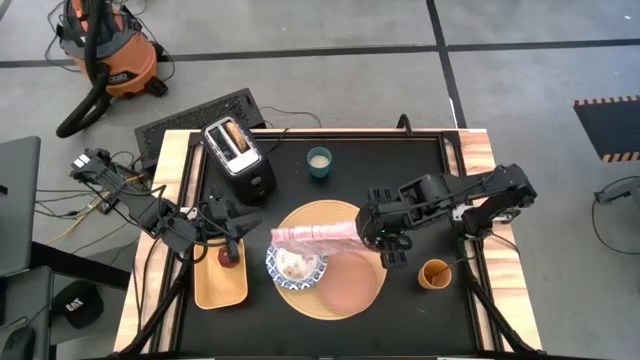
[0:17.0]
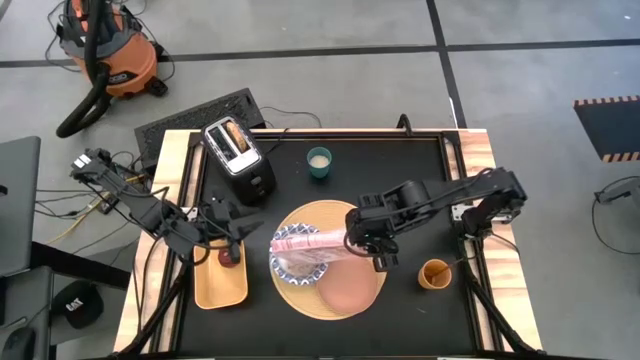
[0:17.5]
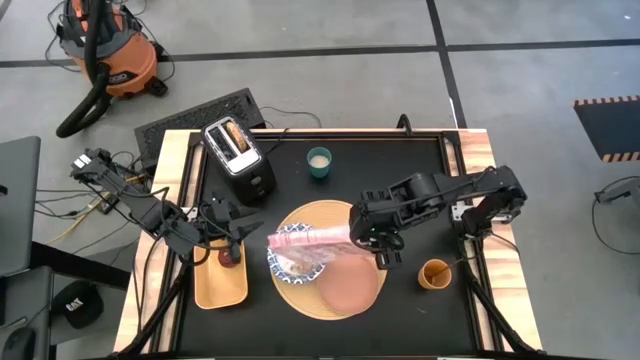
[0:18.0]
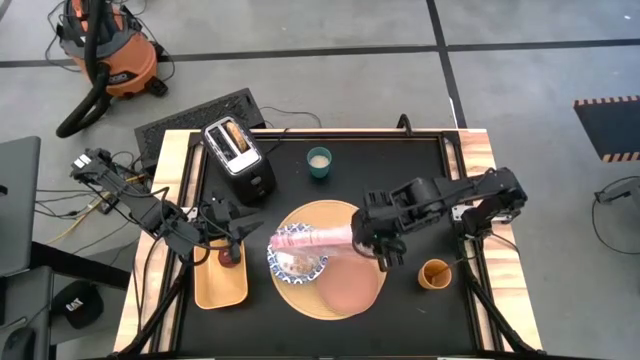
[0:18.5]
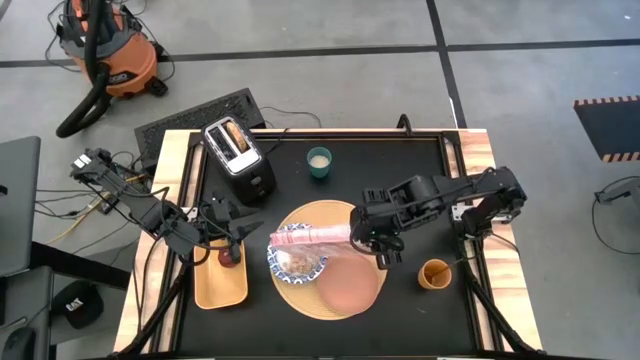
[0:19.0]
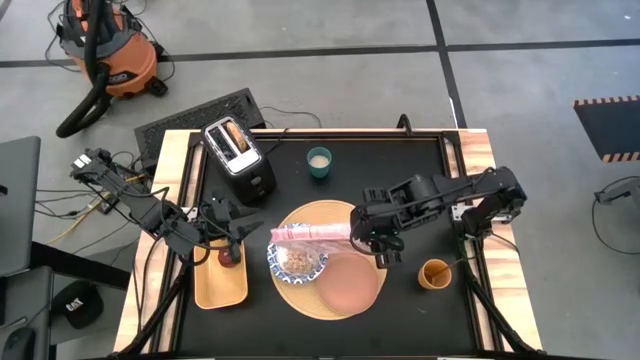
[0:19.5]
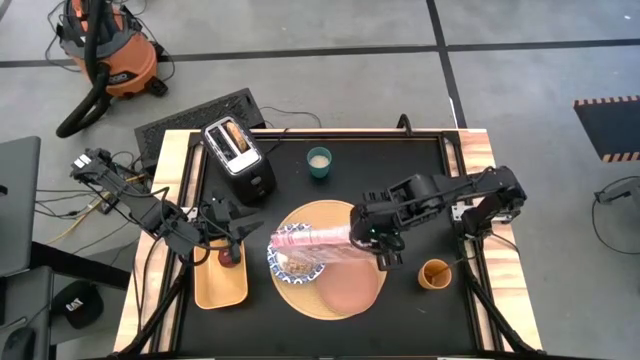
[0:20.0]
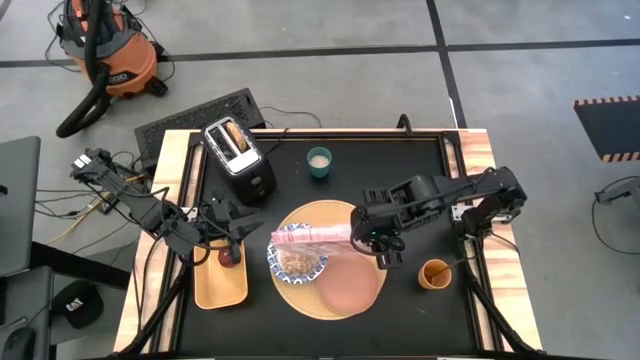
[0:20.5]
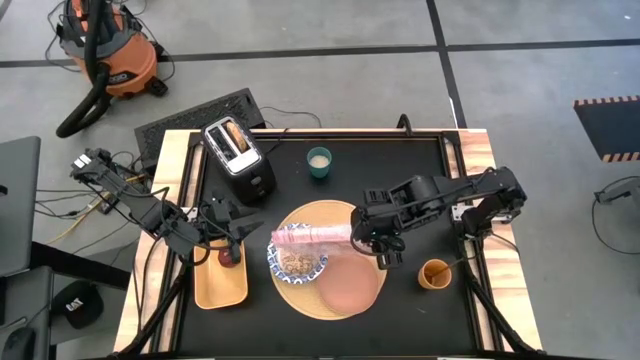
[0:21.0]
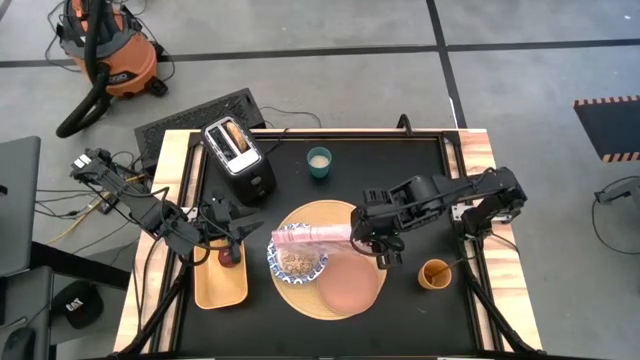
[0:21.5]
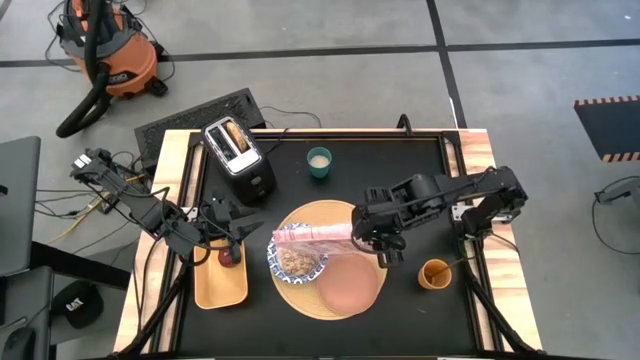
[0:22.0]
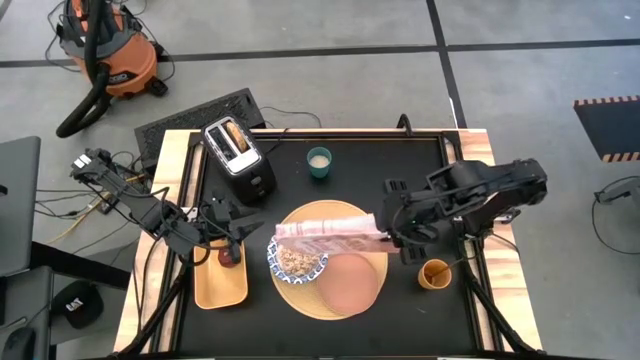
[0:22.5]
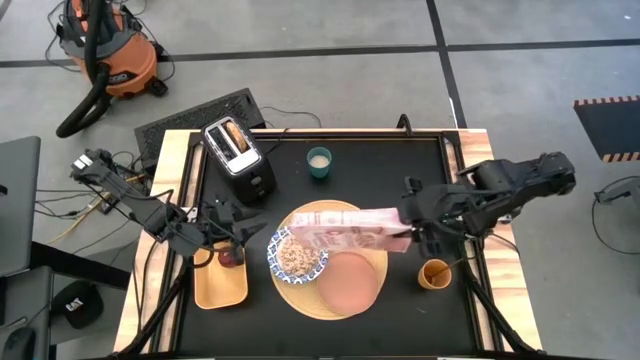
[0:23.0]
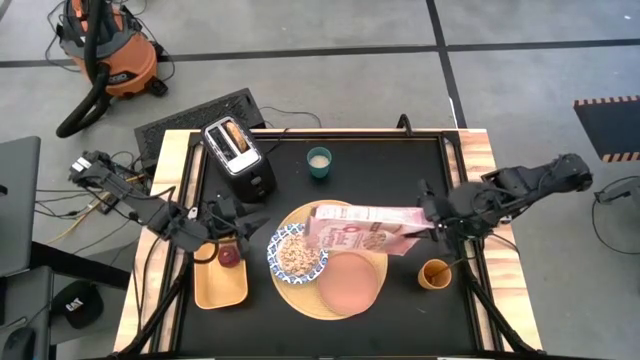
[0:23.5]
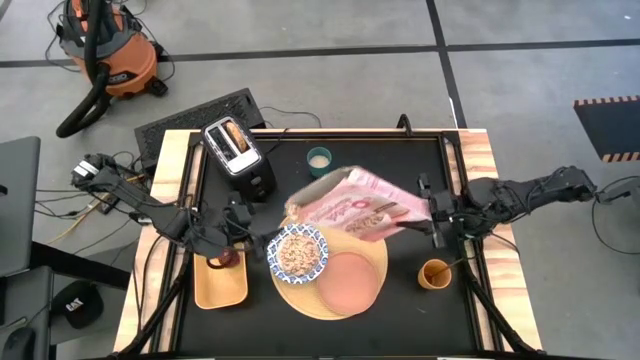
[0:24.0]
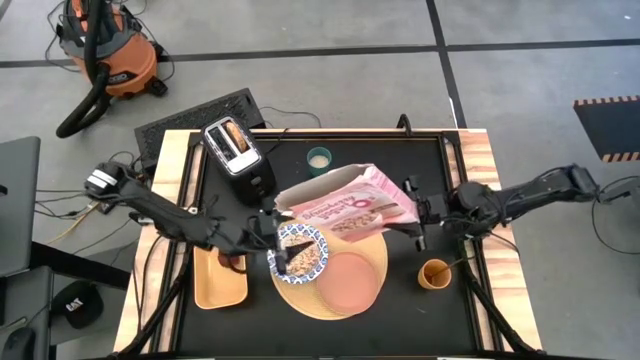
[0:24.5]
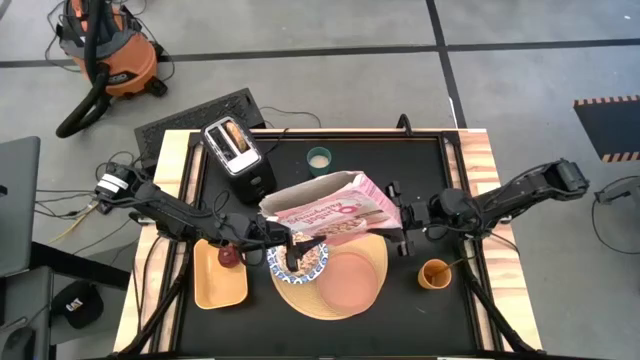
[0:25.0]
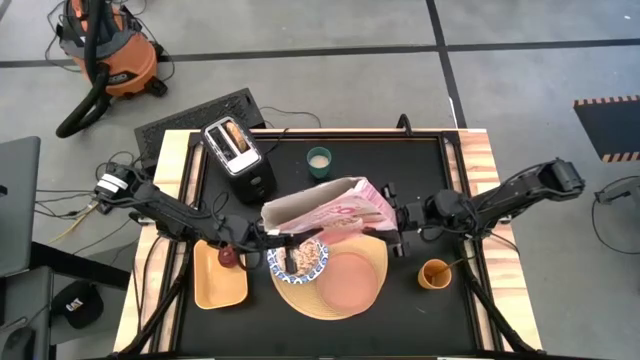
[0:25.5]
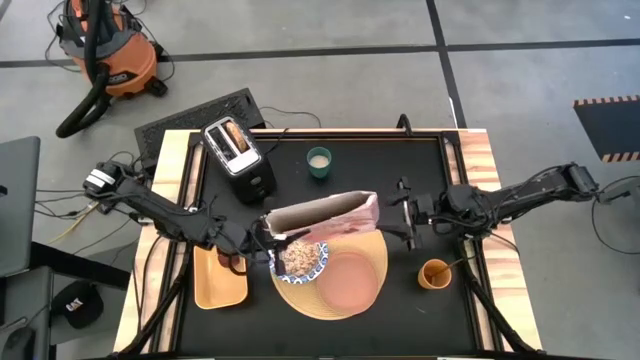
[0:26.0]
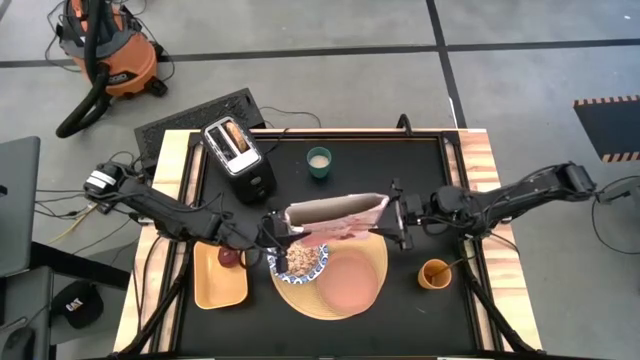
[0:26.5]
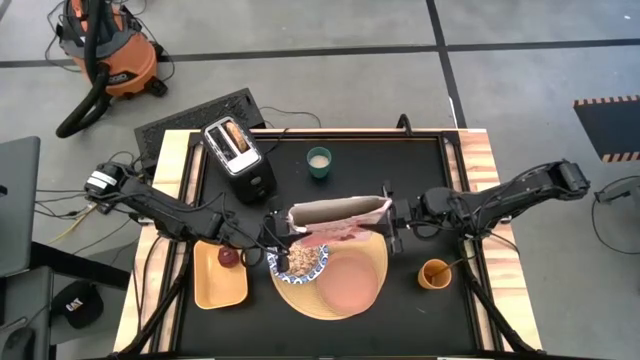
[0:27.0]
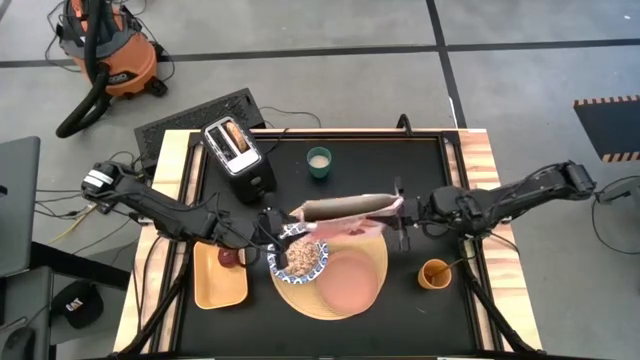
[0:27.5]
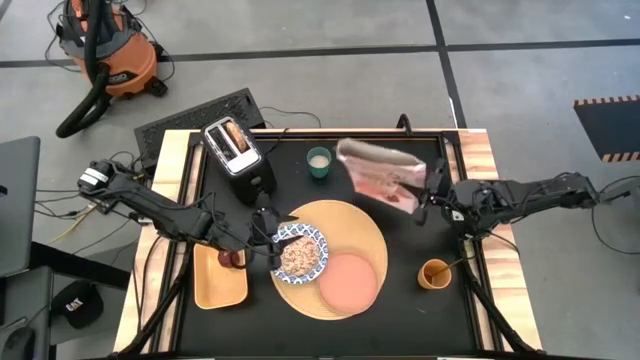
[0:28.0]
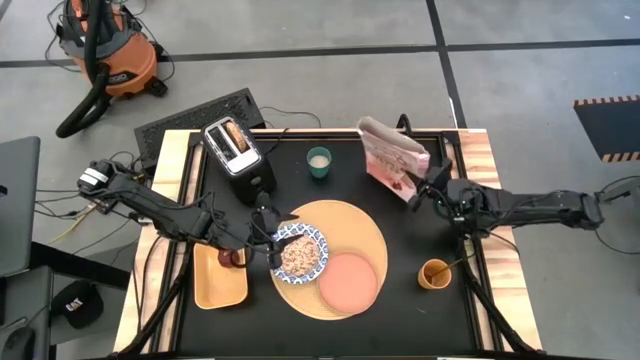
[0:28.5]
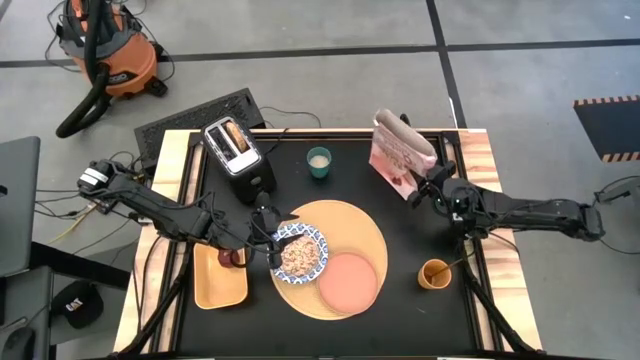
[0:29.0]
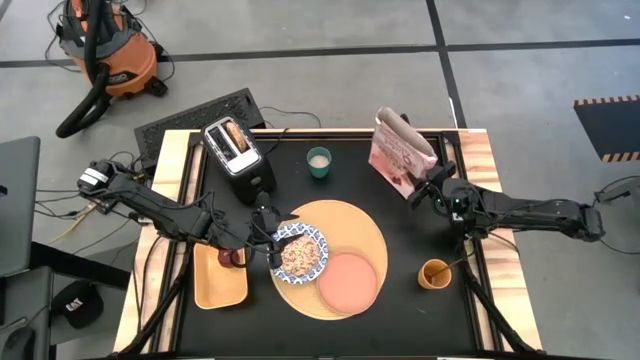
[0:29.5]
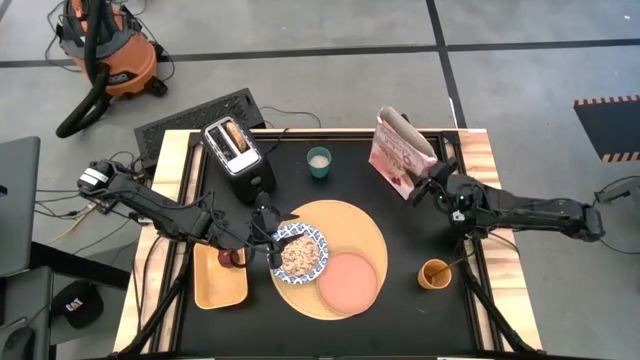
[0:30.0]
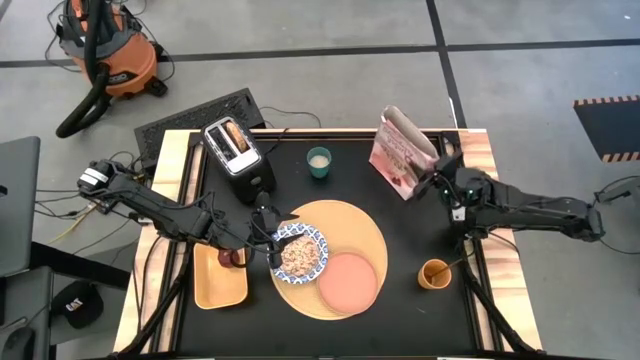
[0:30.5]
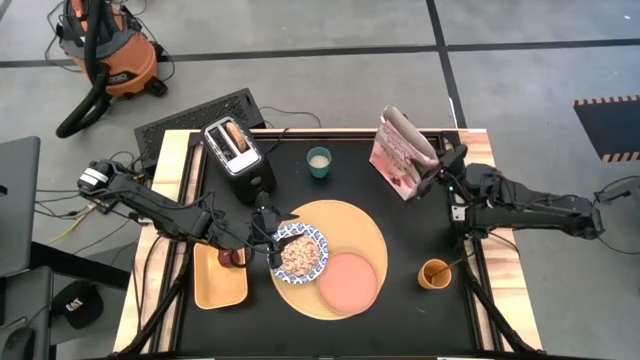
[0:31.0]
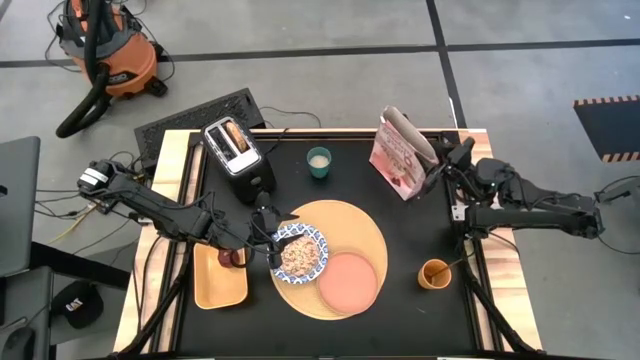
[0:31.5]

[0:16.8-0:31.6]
Task: Arrange a breakfast setting
Pour the cereal into the bowl

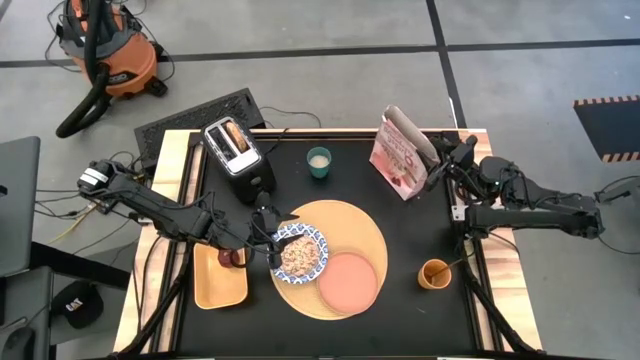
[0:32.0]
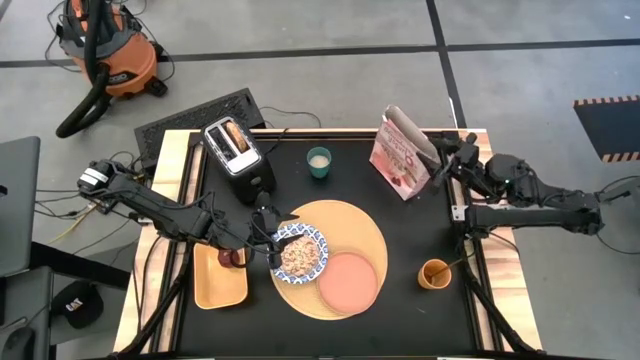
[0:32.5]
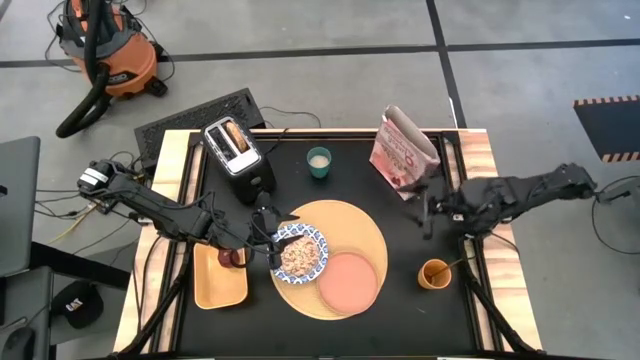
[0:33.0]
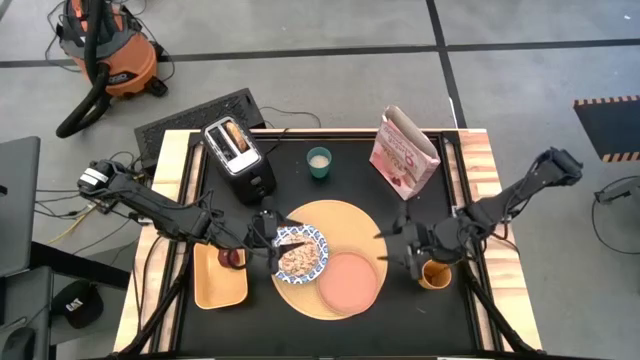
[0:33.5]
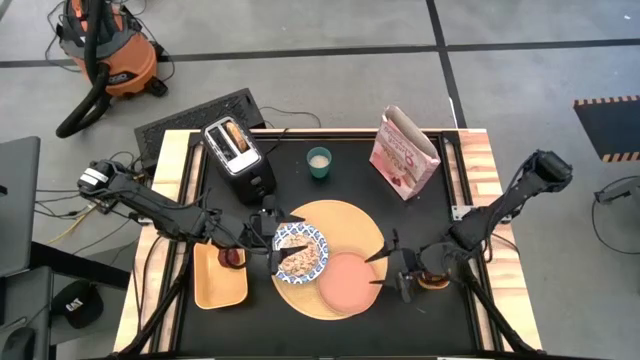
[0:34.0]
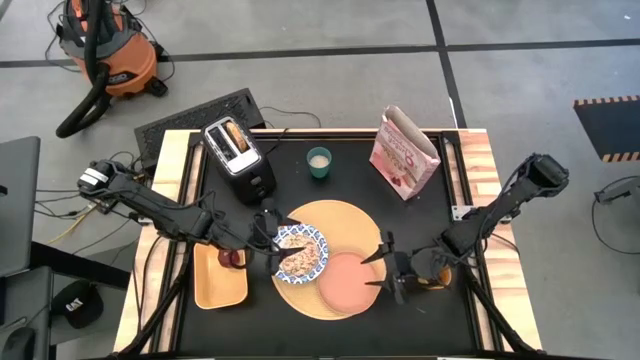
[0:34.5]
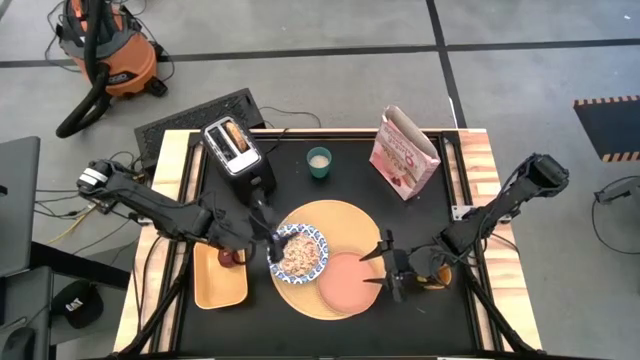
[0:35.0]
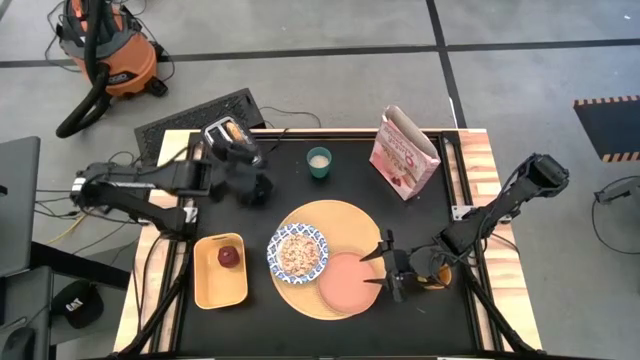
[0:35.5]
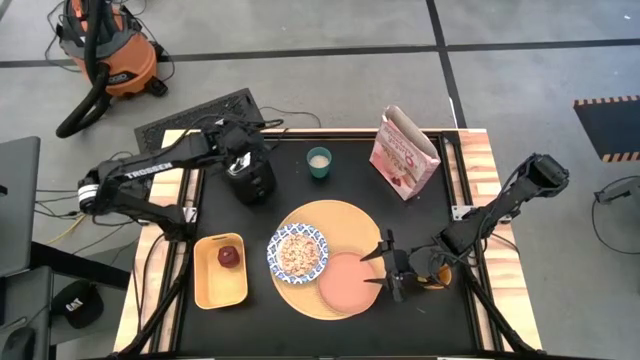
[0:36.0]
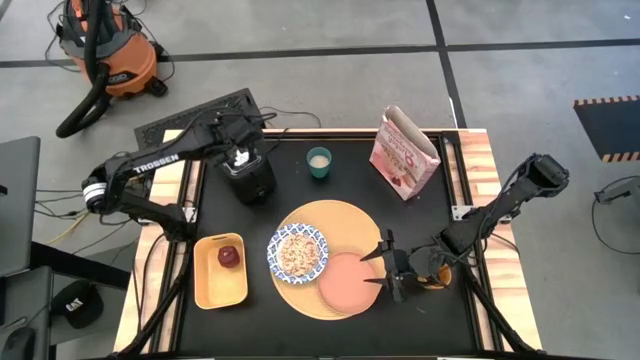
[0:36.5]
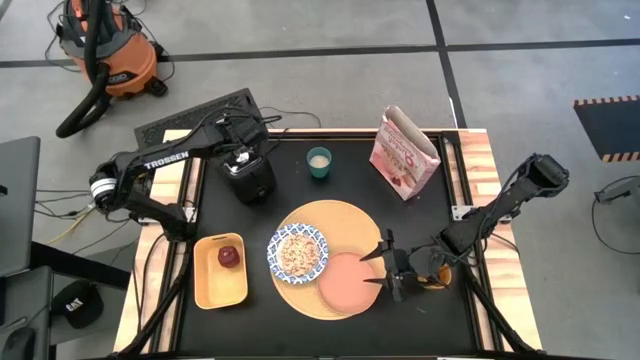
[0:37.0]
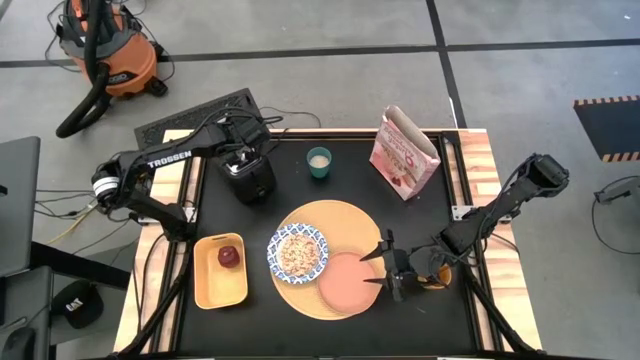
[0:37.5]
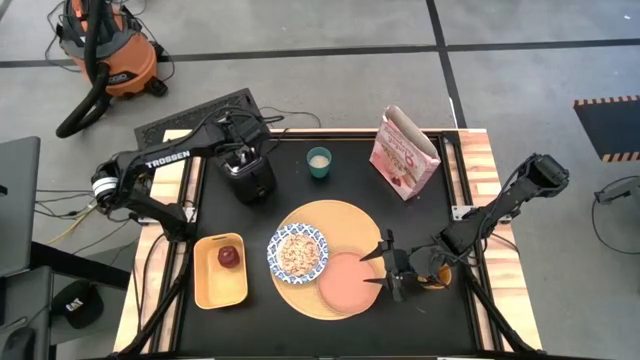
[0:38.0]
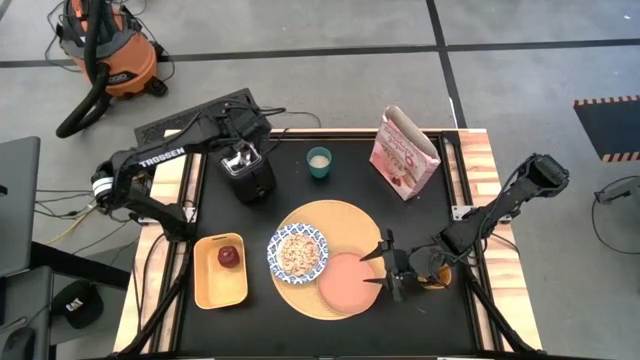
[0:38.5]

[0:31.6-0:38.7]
Put the bagel on the plate
